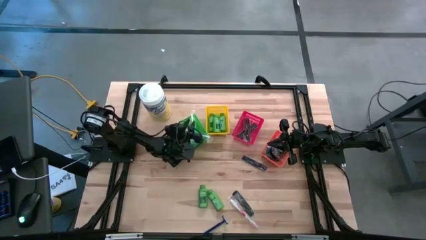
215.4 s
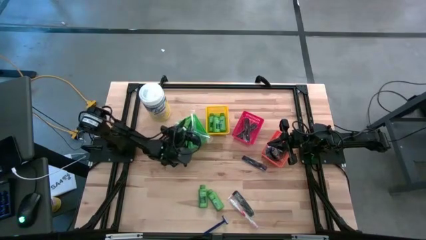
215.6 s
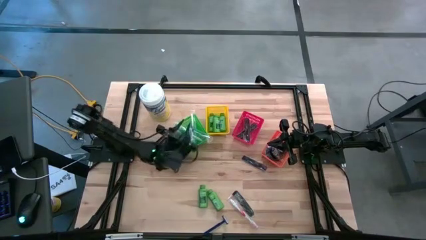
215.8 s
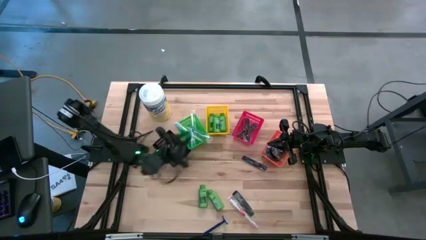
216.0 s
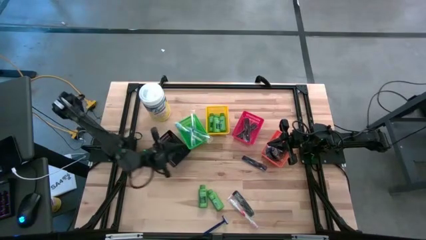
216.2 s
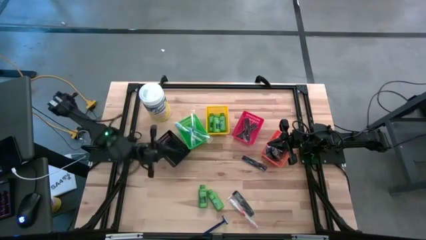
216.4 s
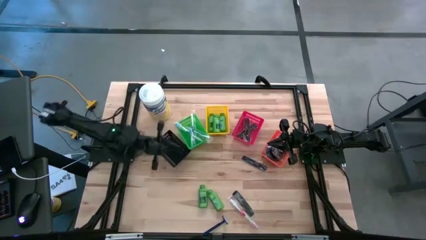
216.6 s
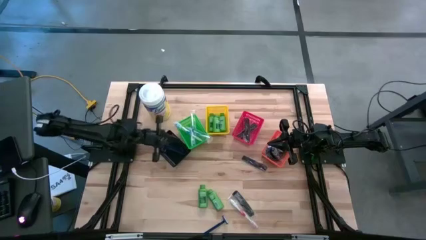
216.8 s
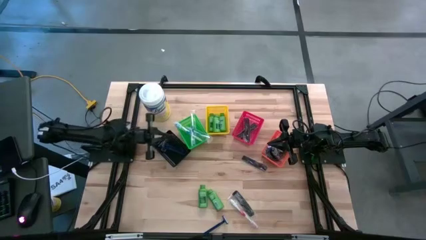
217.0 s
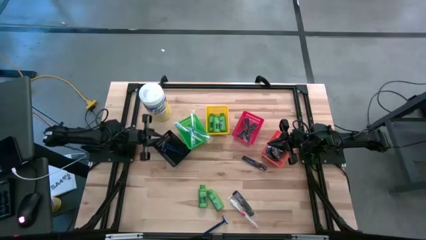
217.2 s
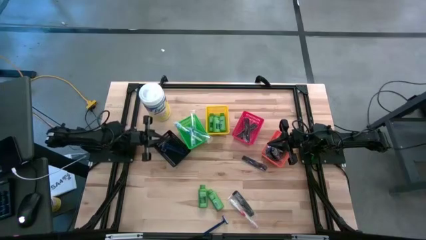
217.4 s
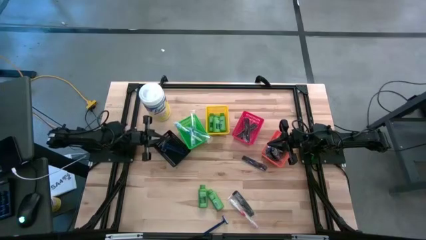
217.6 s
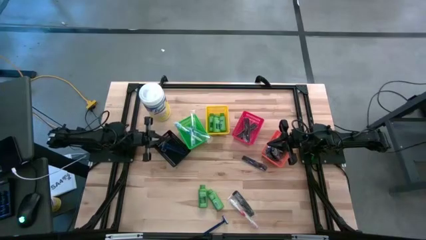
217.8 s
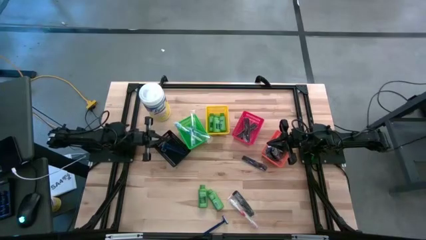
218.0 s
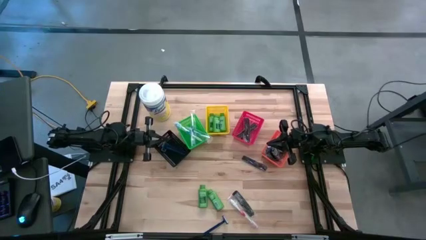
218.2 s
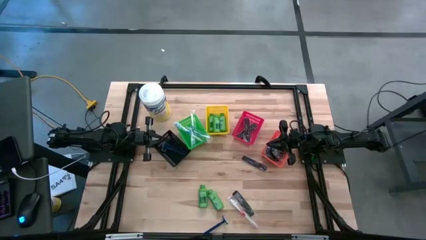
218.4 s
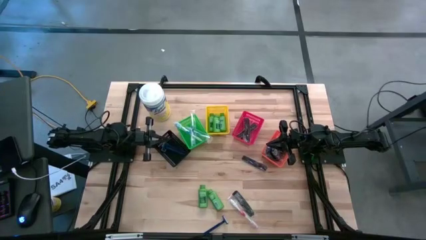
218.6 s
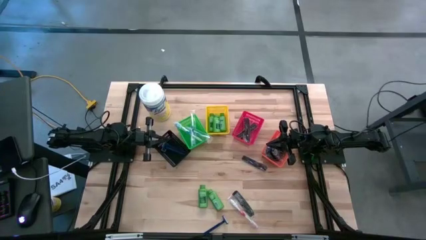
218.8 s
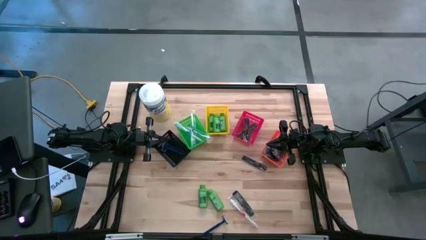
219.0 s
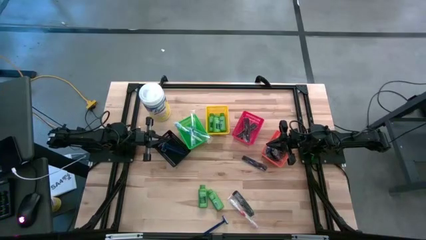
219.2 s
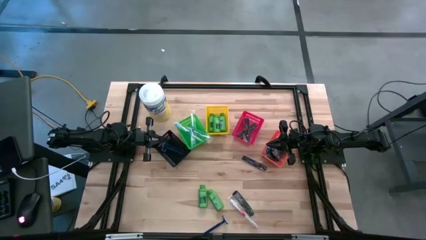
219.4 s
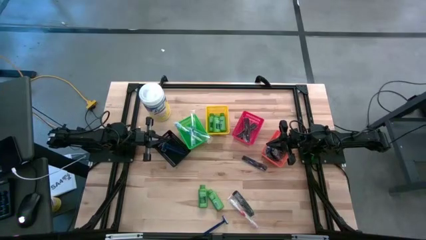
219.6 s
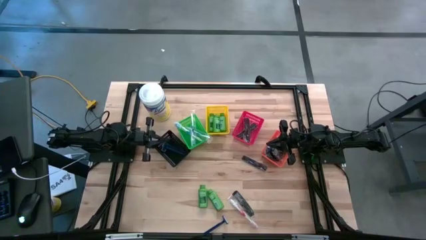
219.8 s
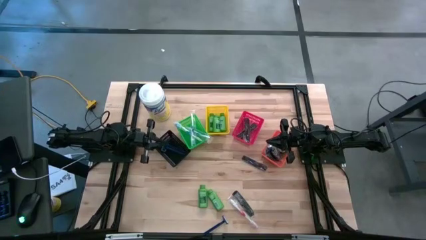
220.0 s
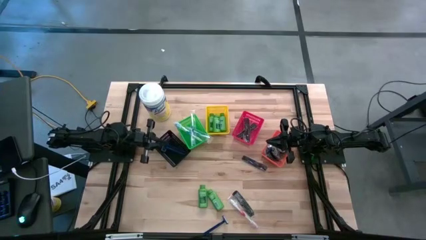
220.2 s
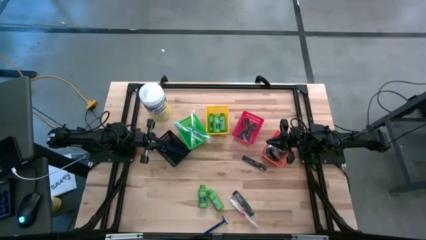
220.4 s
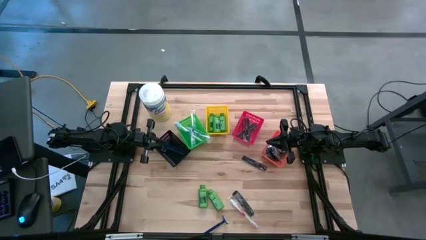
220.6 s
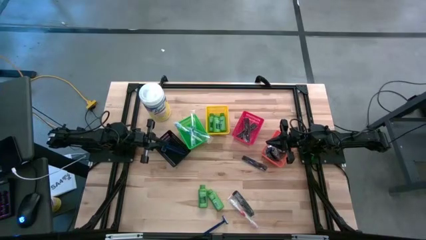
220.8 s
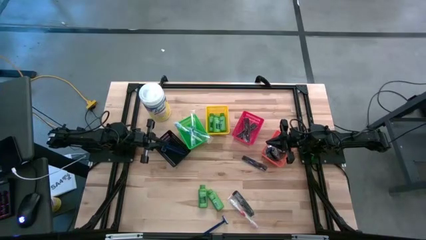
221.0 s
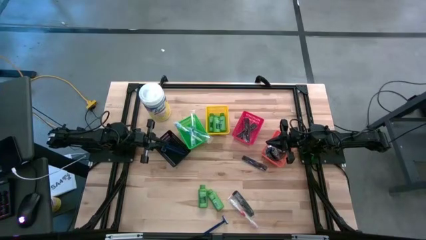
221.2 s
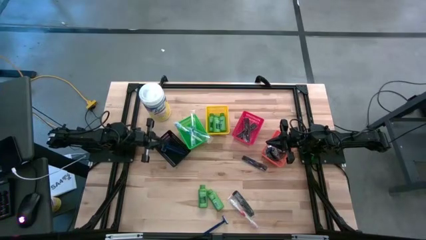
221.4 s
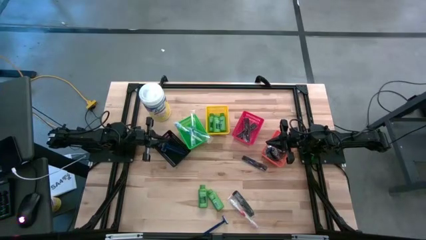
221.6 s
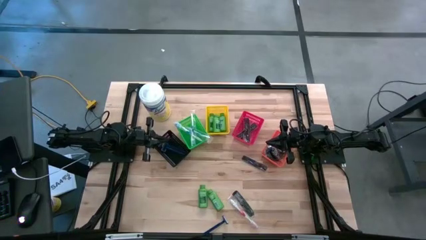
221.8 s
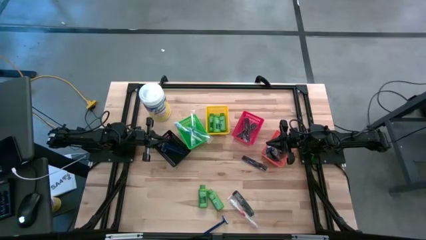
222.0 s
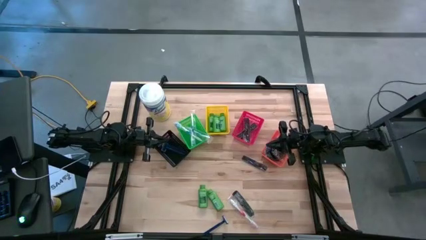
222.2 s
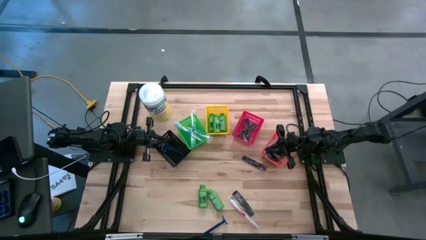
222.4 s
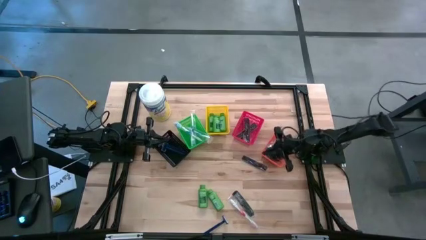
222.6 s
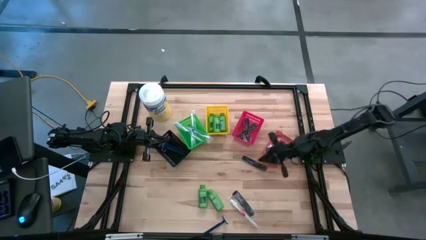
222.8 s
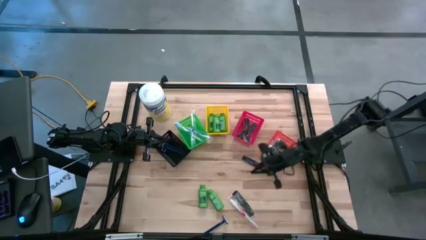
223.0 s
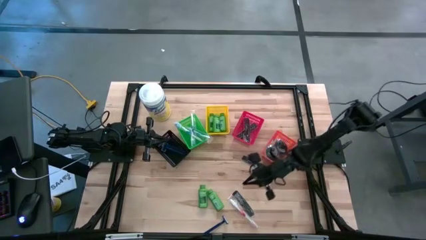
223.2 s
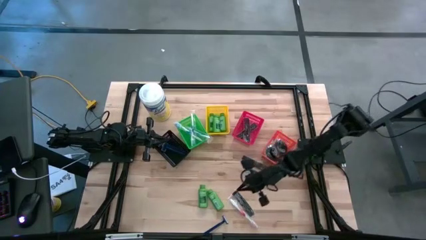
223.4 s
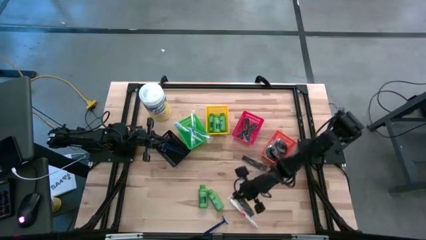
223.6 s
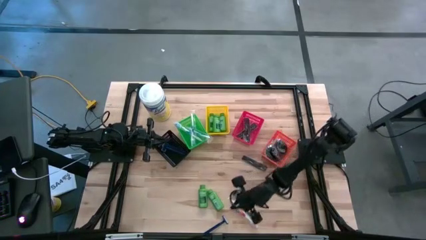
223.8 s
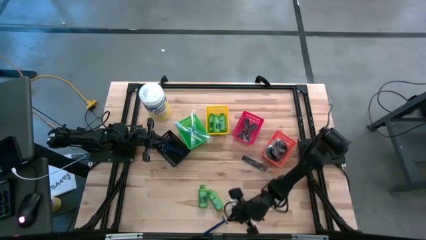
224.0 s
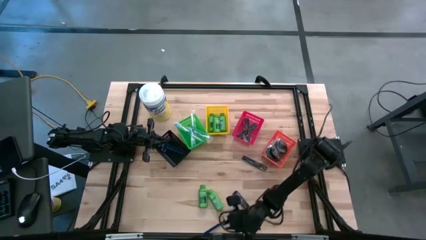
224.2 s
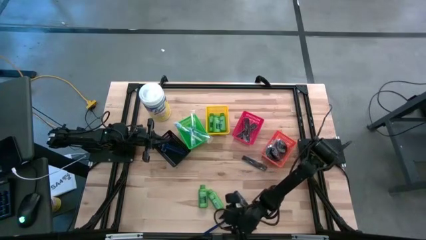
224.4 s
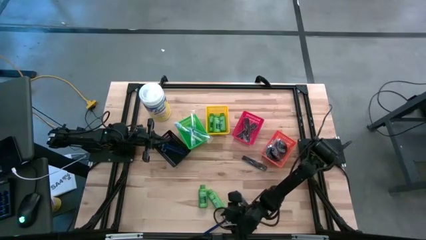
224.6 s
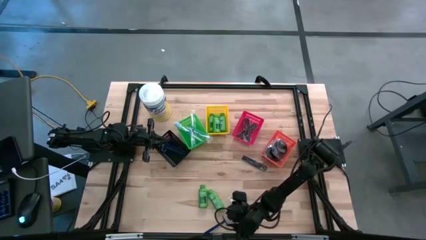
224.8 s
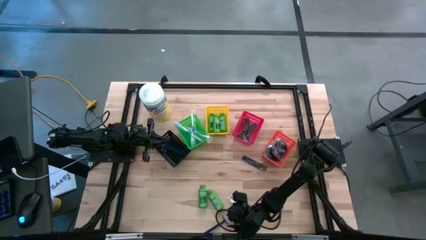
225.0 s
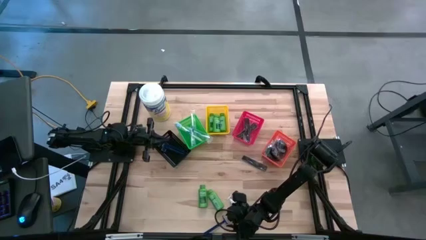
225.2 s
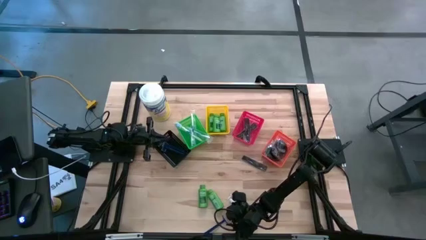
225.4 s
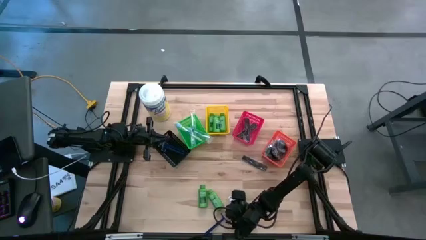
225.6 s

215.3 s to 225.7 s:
Task: Pick & Place Travel size toiletries
Put the blue razor into the black bin

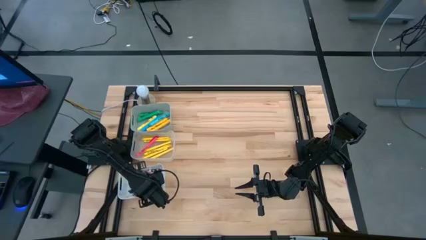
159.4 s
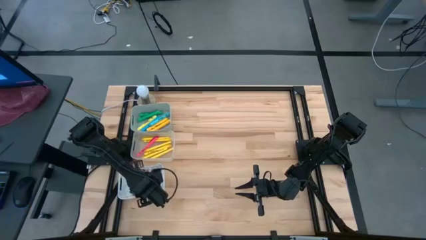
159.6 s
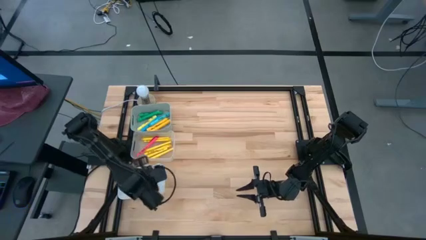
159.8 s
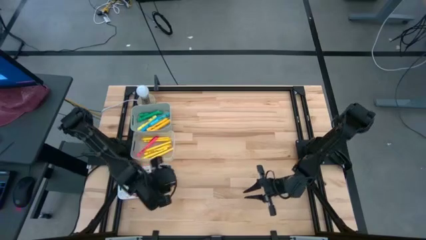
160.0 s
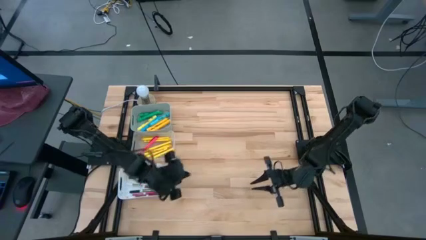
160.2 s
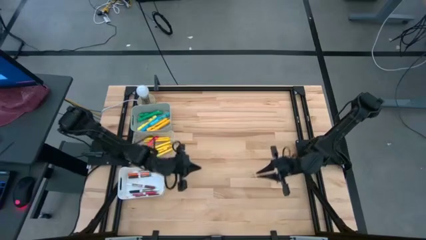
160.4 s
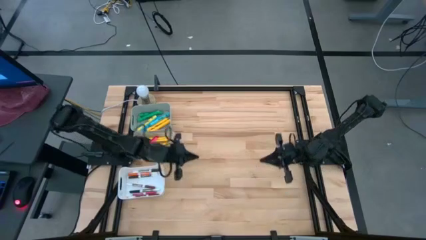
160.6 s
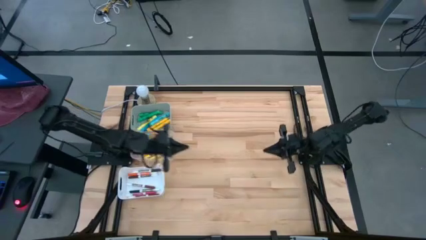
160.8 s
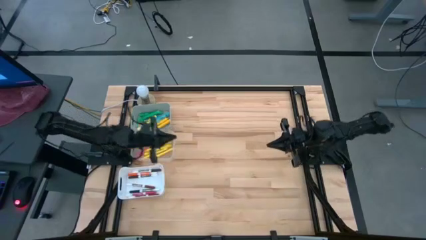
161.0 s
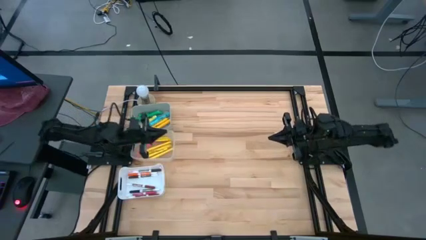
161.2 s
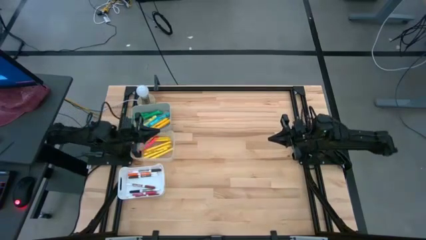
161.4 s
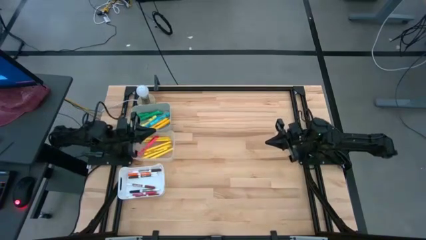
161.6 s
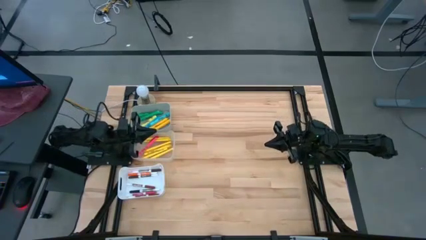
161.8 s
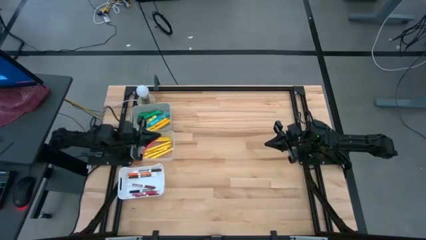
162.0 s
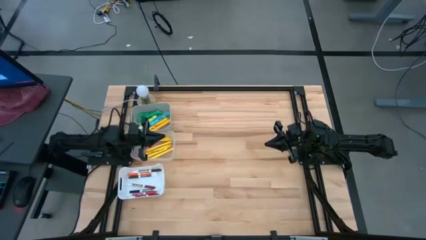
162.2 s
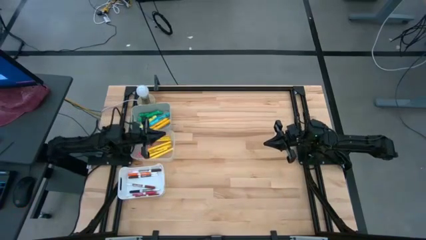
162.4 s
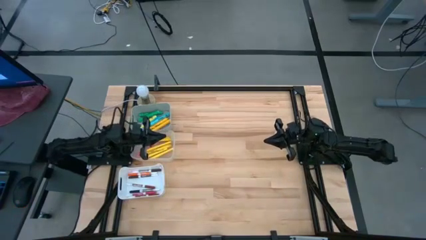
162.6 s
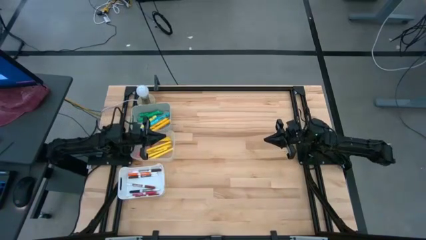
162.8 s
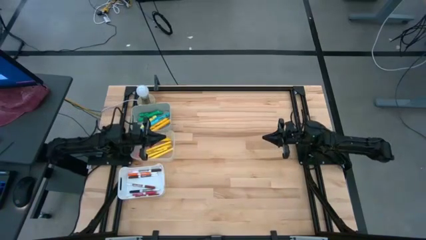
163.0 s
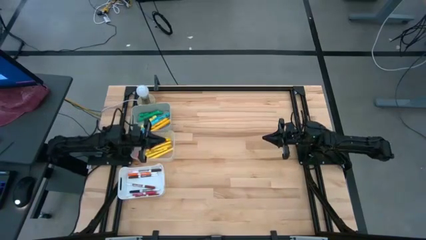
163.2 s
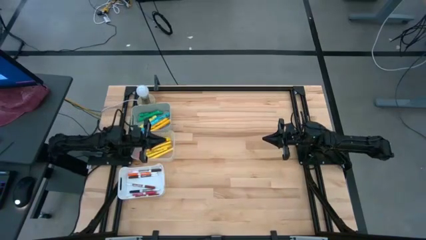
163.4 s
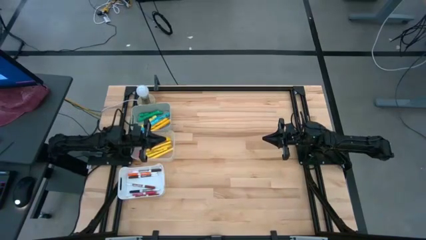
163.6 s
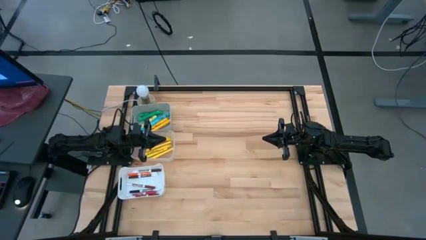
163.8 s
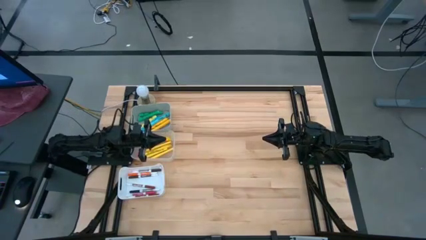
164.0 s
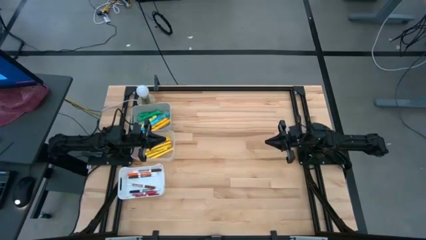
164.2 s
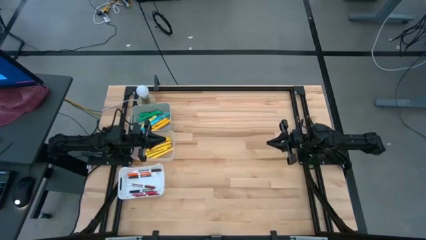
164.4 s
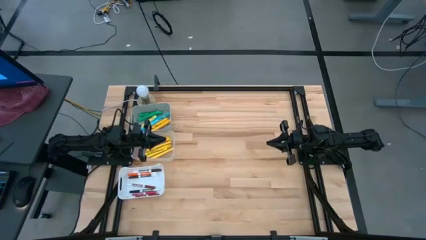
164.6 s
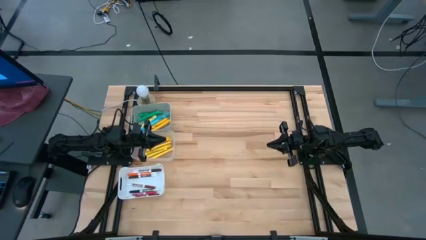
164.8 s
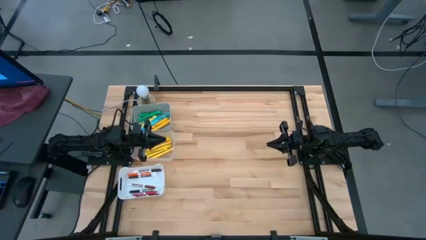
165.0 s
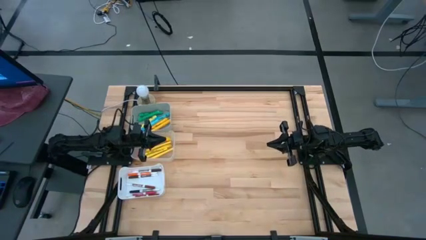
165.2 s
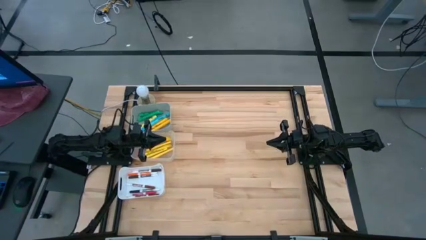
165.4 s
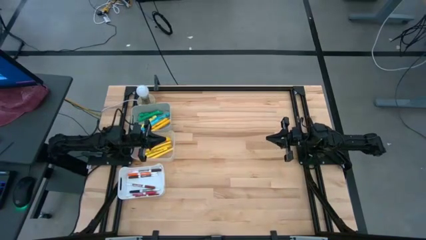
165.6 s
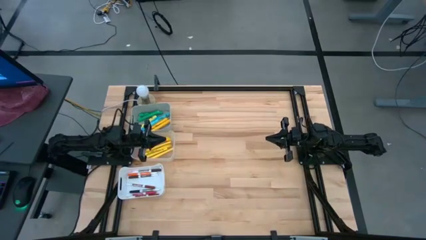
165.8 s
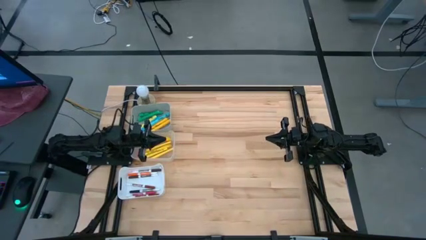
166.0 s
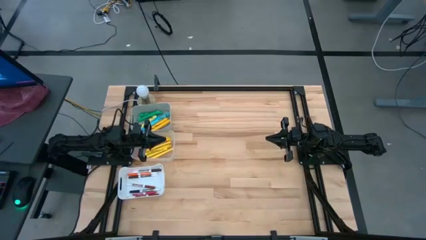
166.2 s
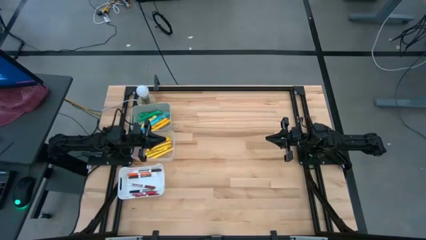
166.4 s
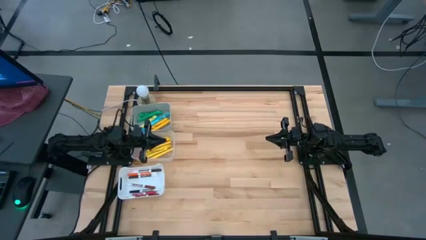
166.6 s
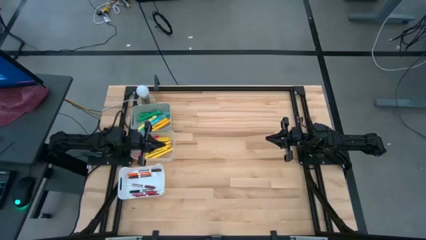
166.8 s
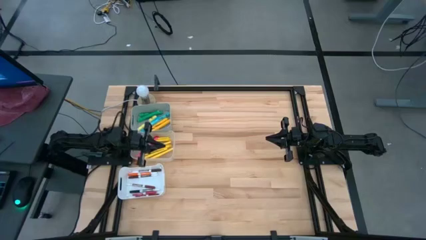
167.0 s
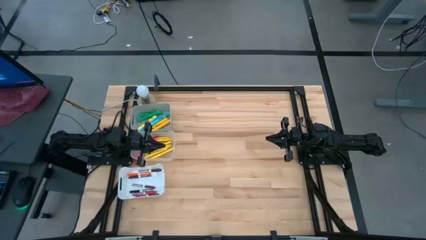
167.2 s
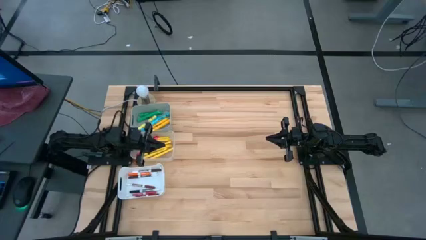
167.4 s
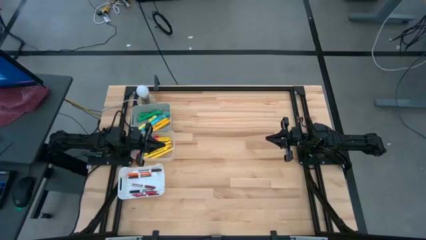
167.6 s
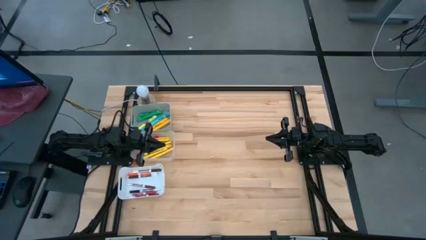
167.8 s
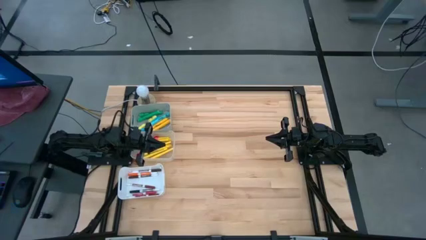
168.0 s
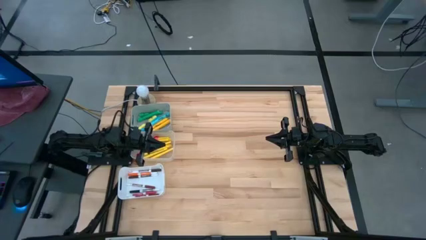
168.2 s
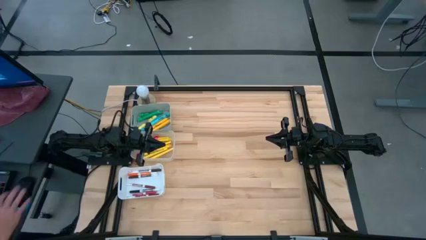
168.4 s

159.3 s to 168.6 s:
Task: Pick & Place Markers
Return to Home Position
